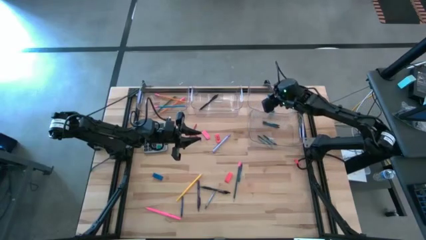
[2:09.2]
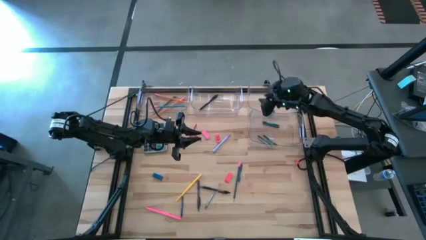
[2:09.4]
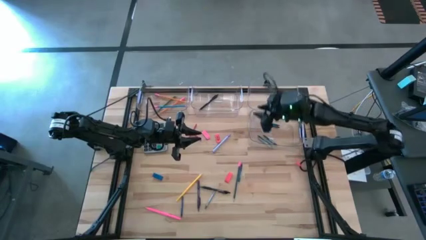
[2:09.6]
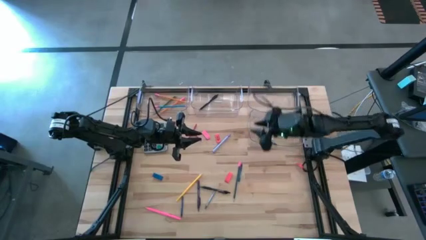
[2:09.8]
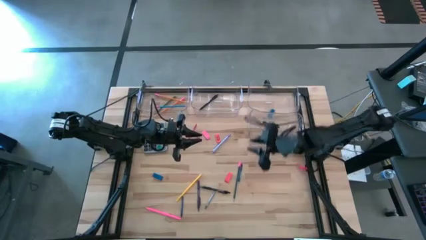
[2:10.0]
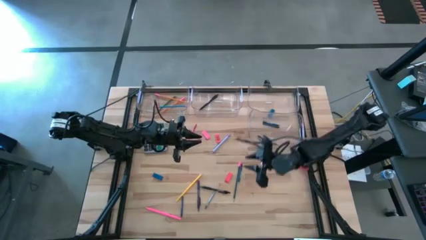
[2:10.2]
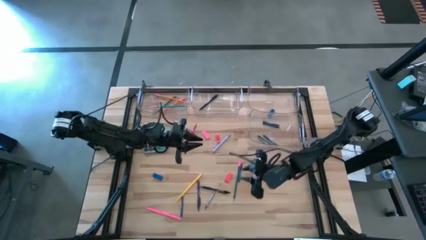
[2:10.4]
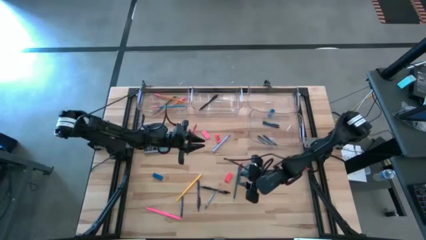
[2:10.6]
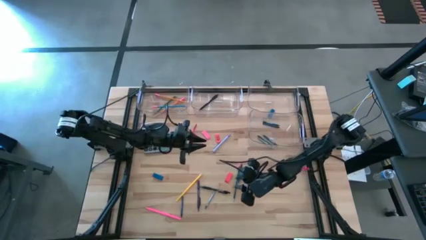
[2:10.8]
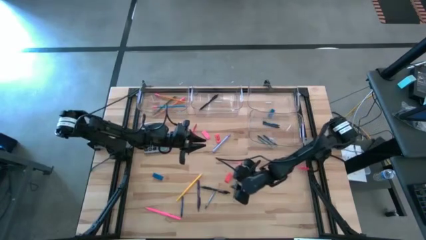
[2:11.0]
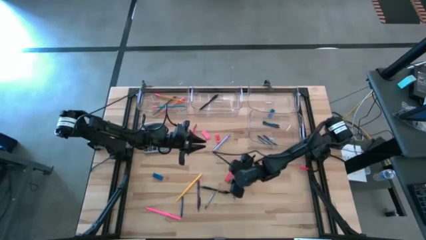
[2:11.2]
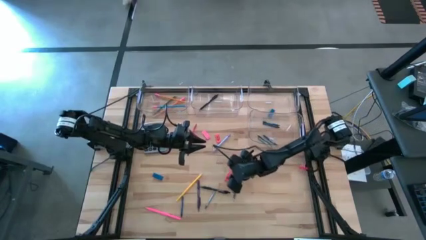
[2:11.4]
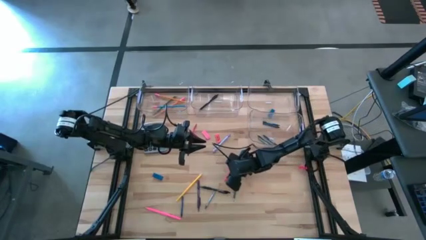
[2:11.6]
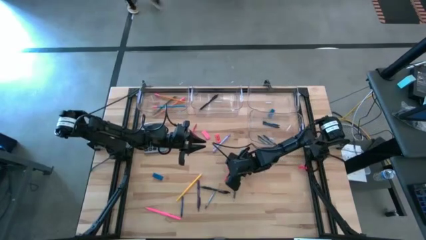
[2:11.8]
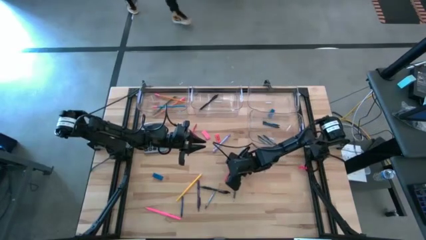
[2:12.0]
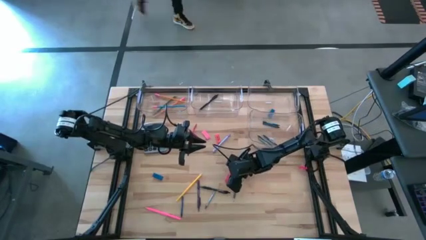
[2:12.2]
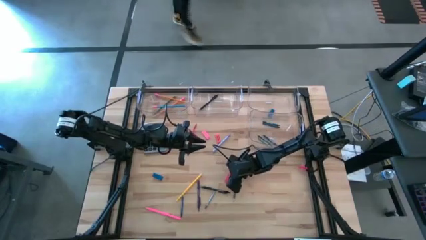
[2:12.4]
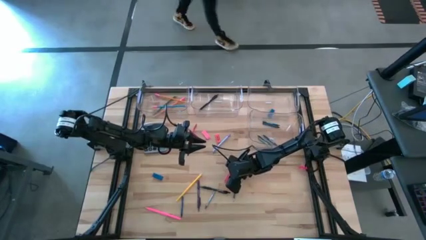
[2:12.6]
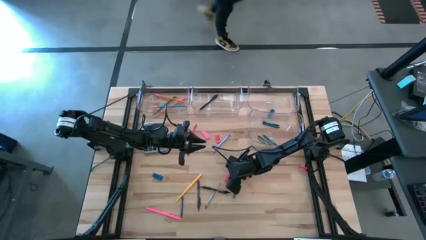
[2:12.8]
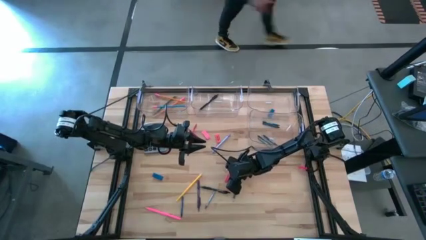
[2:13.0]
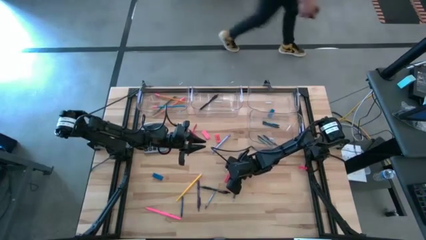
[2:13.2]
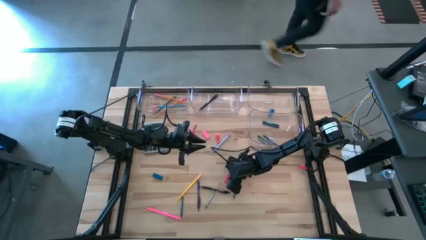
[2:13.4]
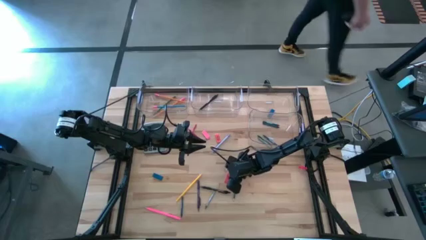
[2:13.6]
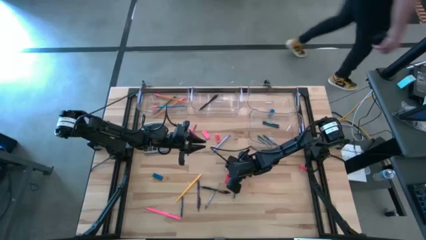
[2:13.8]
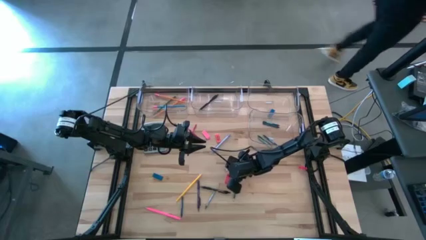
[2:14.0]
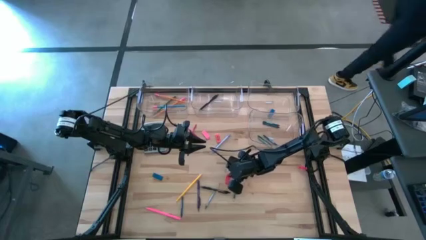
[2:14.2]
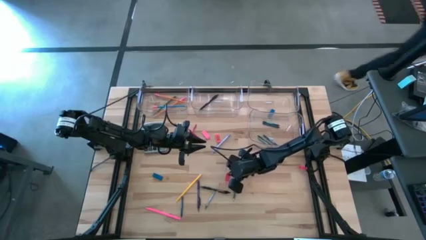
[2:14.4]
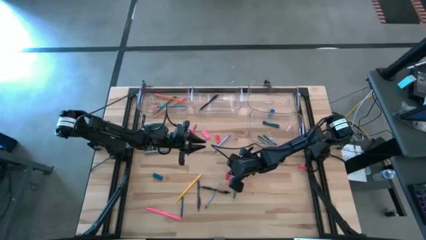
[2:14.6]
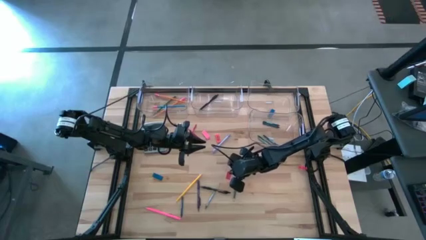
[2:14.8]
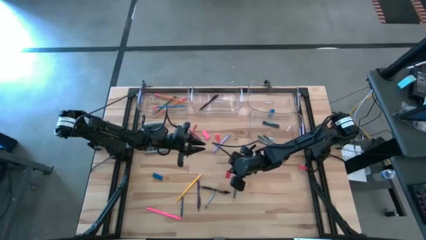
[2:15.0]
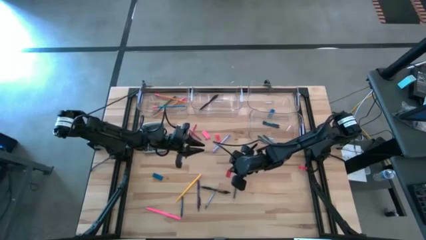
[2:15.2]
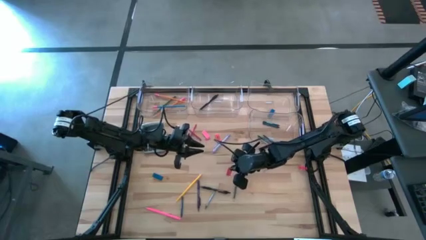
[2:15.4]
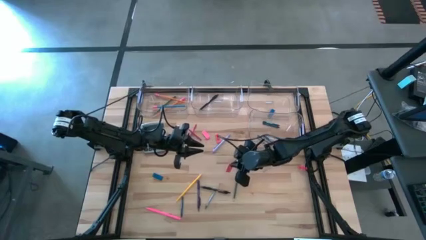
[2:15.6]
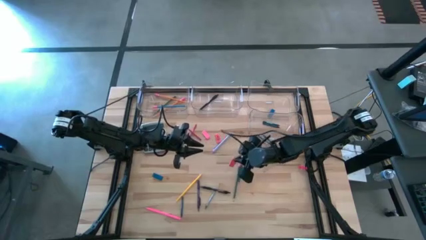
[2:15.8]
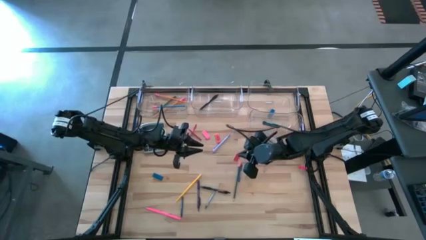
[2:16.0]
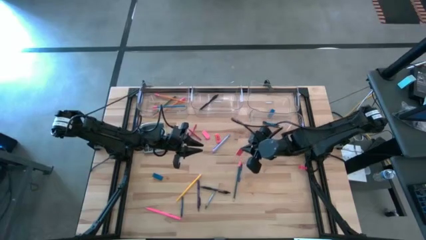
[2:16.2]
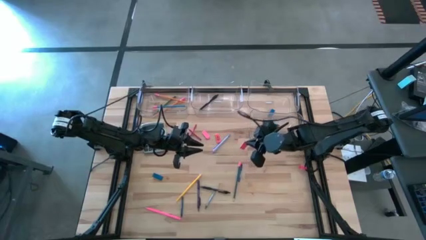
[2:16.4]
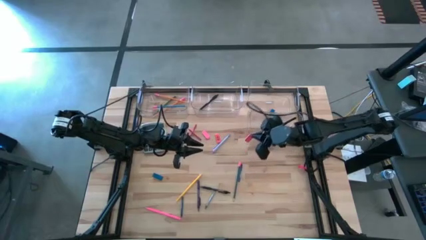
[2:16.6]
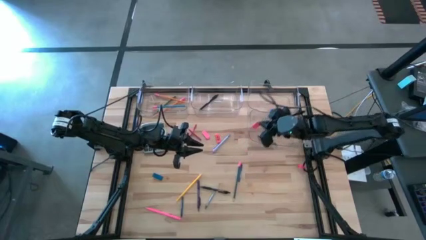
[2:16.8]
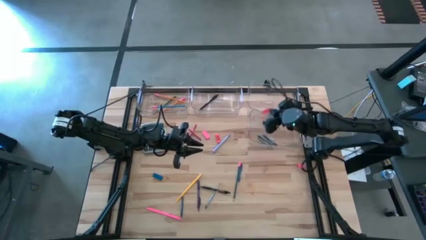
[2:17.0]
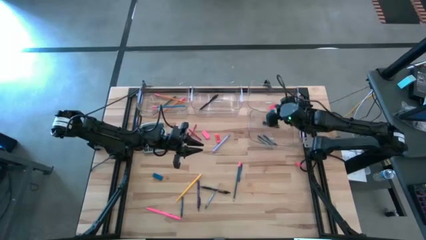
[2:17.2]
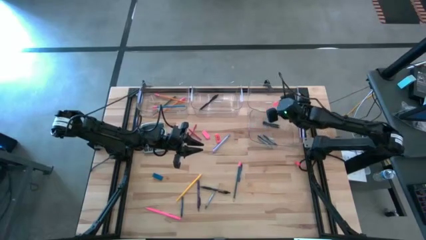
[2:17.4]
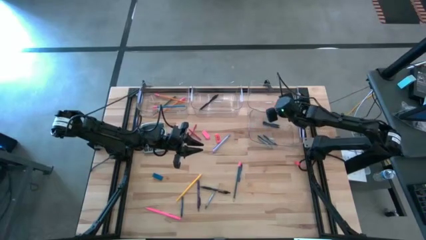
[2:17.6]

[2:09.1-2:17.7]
Task: Sort crayons/erasers/pens/pencils in bins
Put the orange eraser into the top right transparent bin

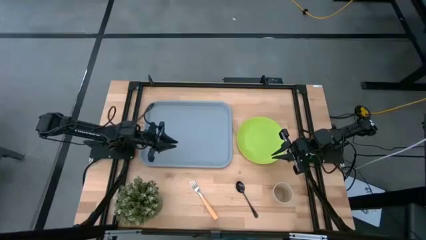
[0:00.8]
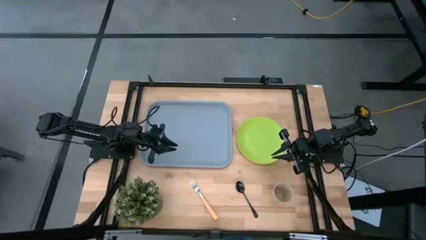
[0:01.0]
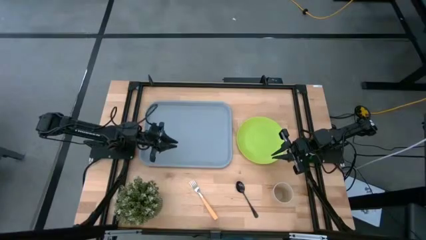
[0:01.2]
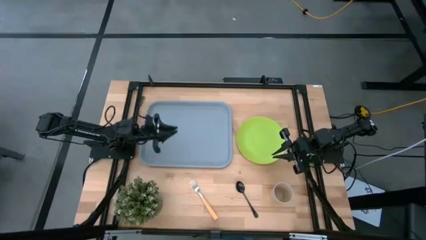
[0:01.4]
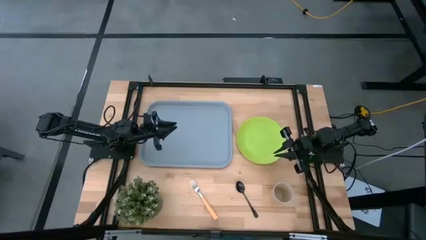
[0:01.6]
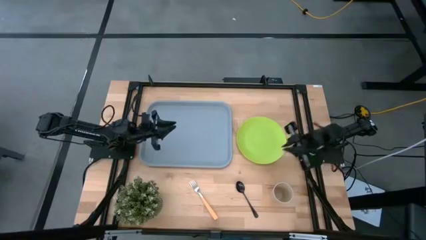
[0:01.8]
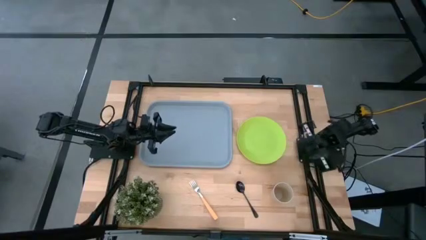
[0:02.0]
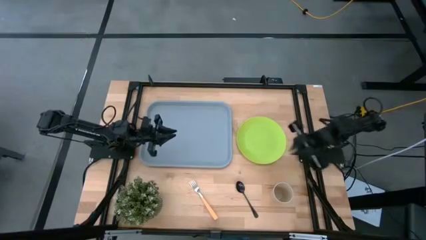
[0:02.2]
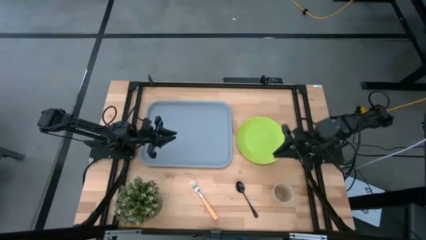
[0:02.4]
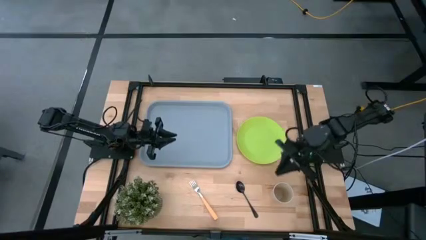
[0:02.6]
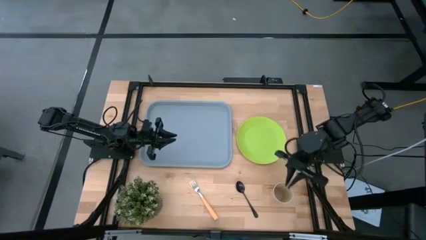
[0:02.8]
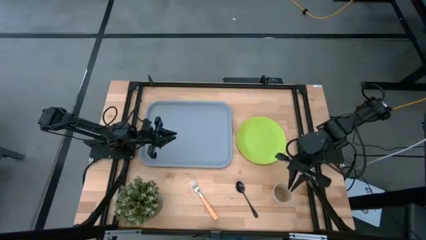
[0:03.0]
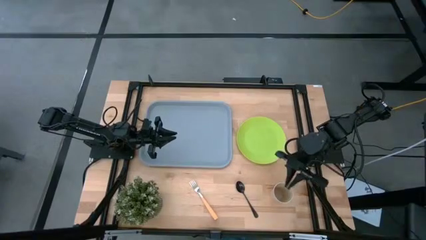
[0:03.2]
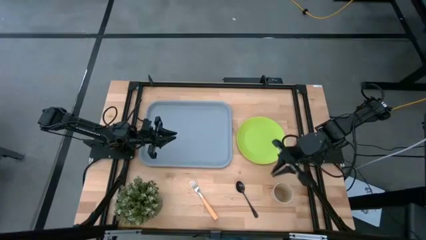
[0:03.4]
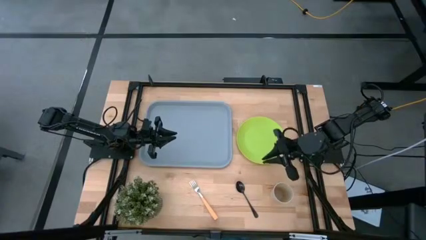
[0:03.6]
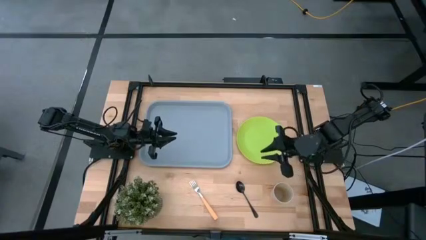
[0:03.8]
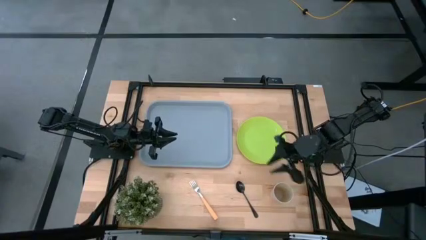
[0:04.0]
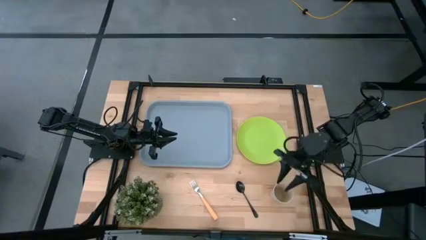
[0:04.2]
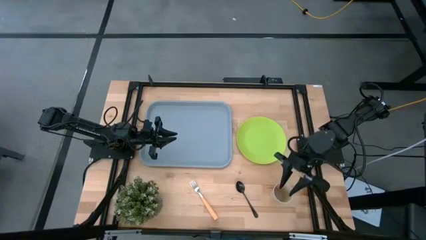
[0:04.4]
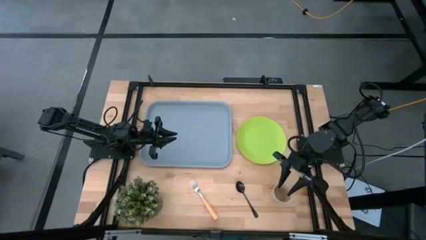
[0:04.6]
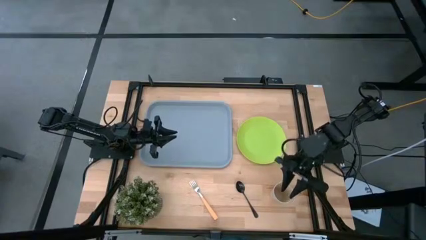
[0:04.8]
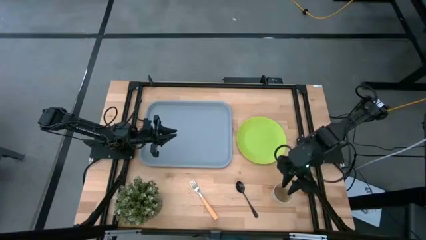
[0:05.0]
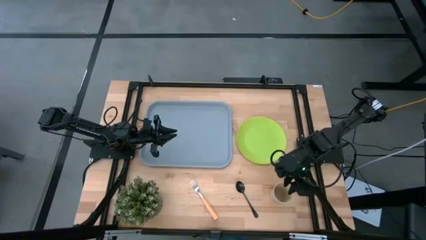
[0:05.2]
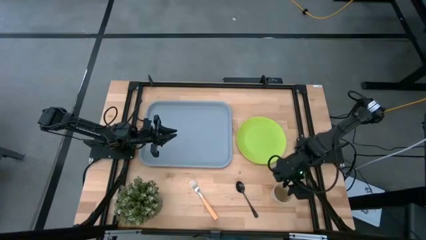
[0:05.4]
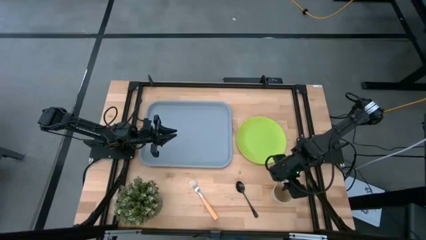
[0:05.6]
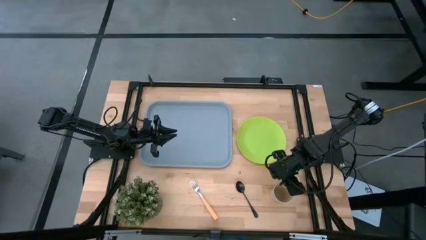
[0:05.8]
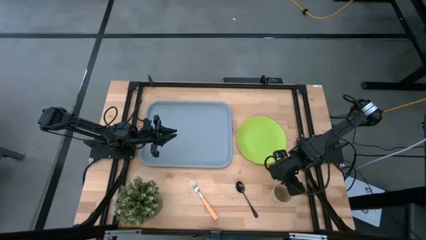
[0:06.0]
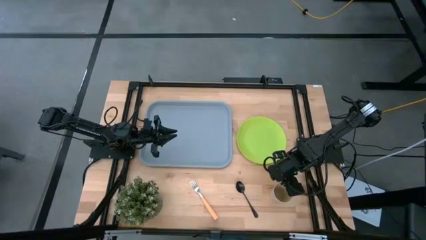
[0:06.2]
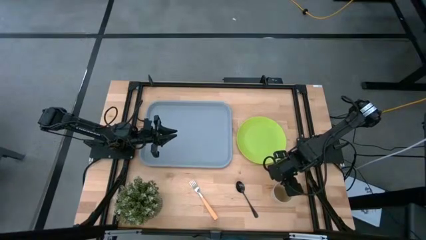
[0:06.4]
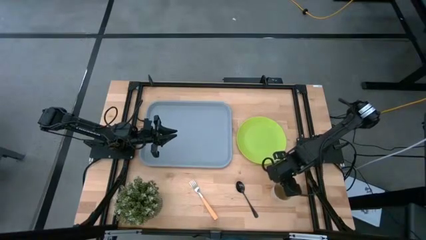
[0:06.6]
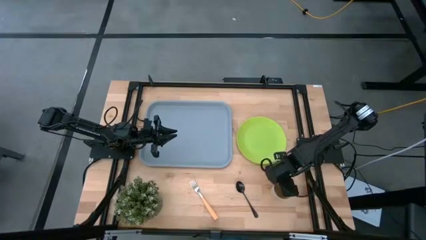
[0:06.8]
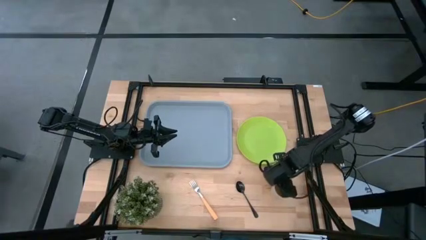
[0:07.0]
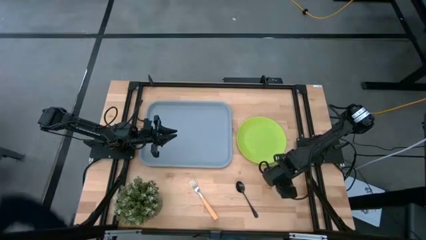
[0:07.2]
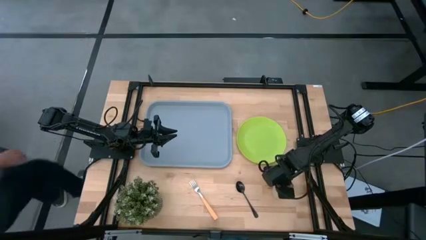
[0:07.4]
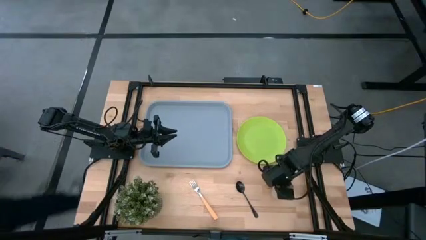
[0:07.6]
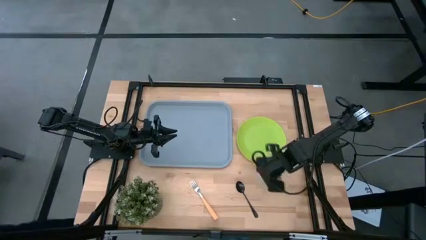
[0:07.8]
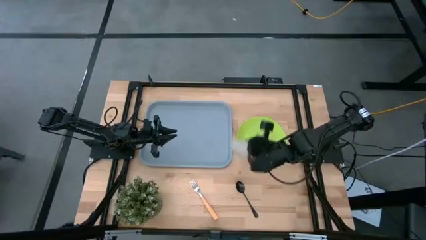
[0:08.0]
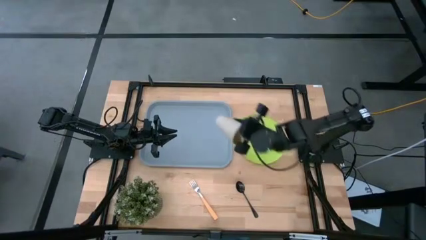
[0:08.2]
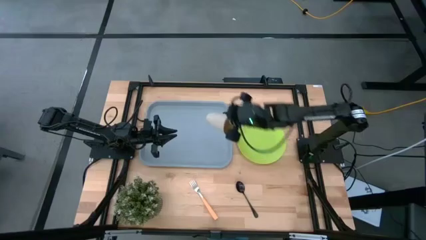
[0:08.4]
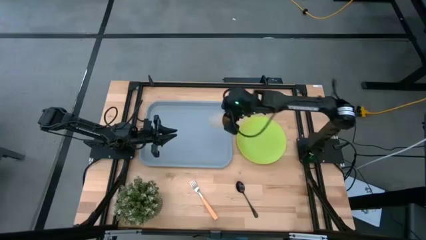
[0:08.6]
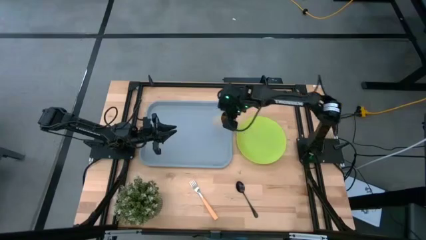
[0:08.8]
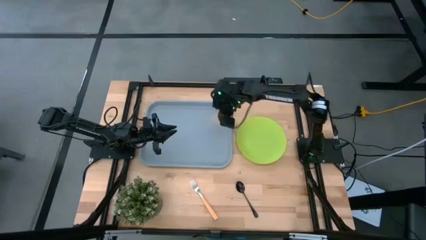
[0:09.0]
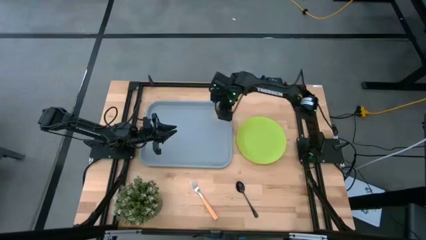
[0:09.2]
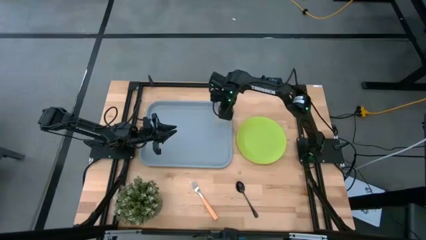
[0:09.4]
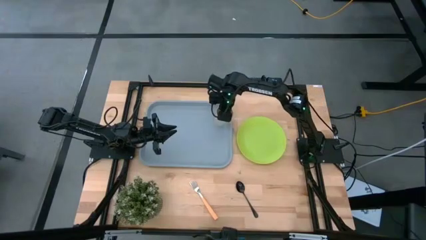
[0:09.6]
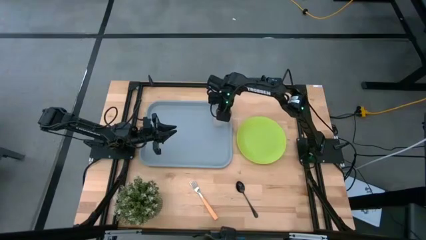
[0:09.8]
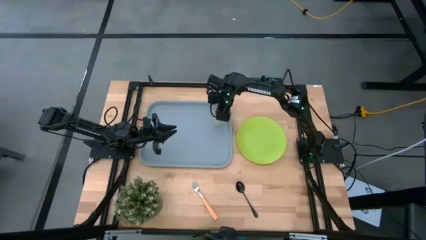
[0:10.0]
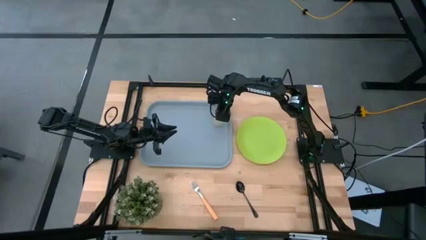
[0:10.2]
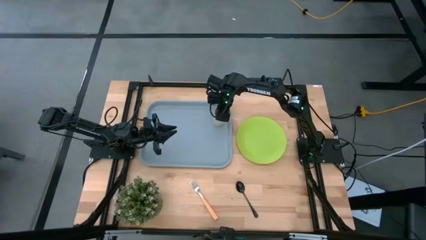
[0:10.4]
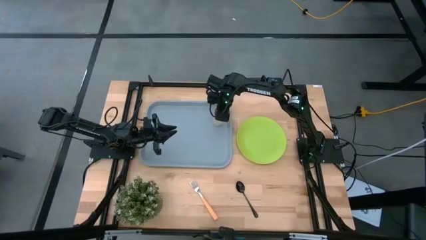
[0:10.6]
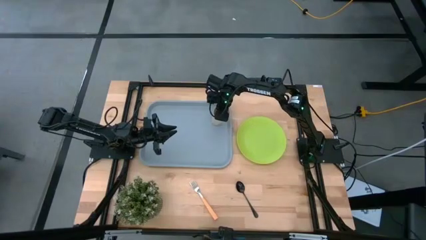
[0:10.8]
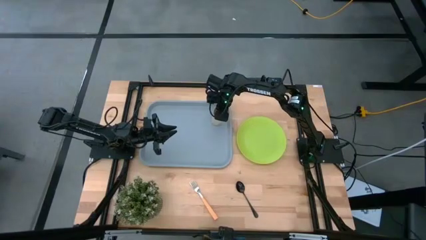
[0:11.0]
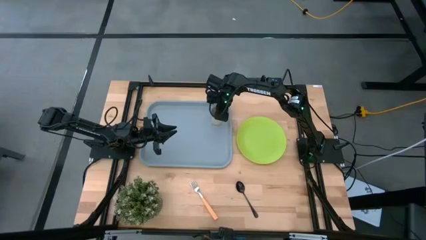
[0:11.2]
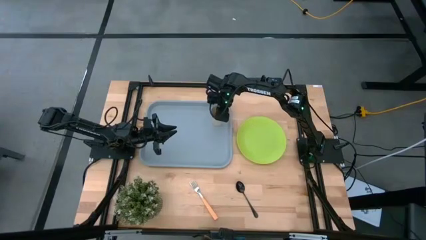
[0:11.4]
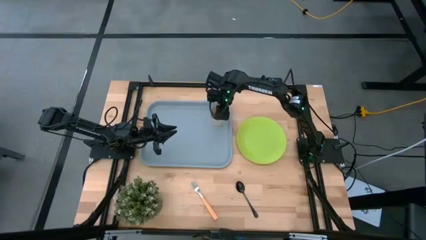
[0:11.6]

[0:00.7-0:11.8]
Task: Pick and place plate/cup/fork/spoon on tray
Put the brown cup on the gray tray
